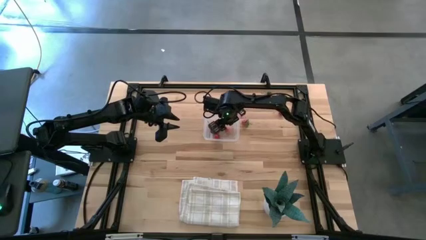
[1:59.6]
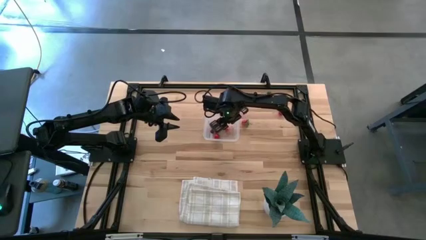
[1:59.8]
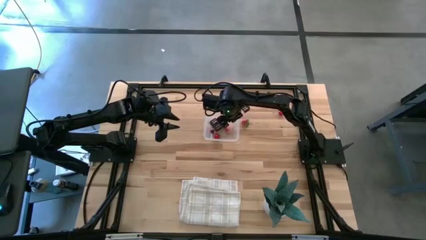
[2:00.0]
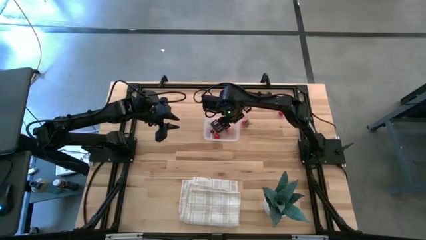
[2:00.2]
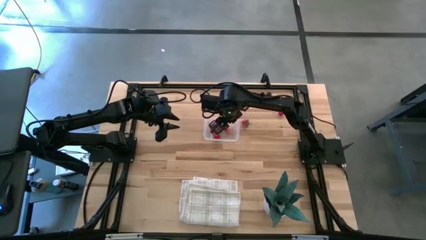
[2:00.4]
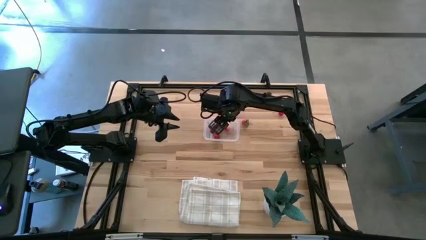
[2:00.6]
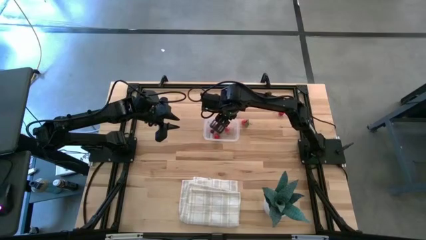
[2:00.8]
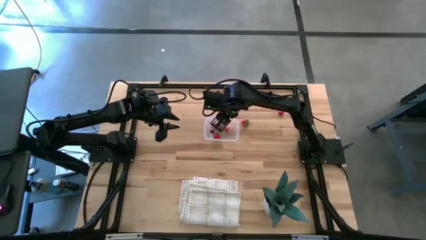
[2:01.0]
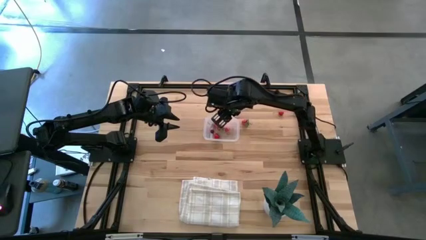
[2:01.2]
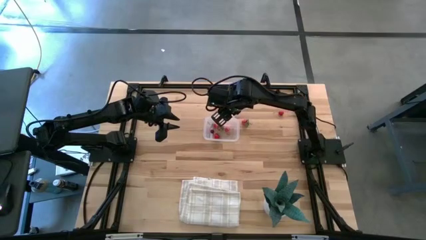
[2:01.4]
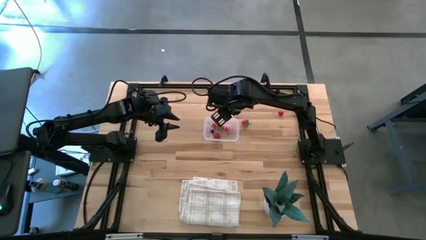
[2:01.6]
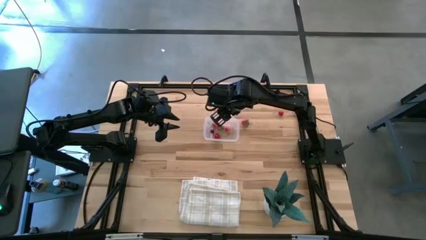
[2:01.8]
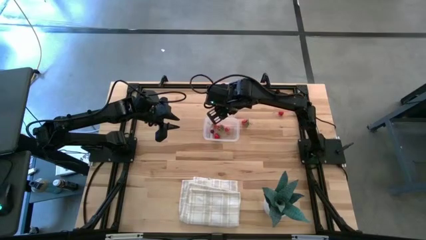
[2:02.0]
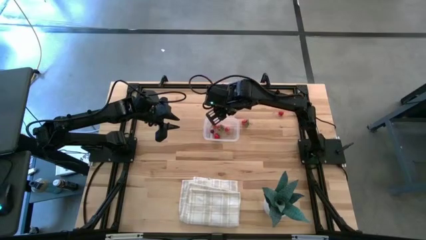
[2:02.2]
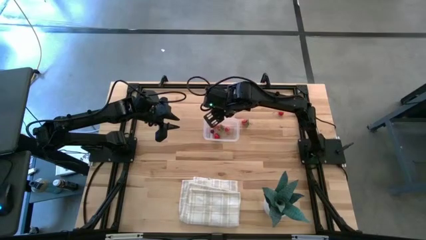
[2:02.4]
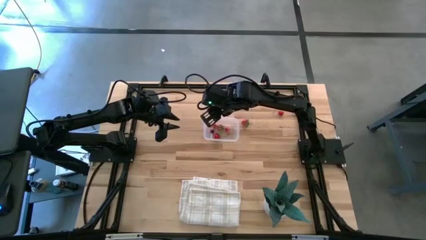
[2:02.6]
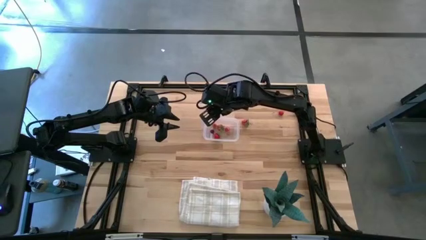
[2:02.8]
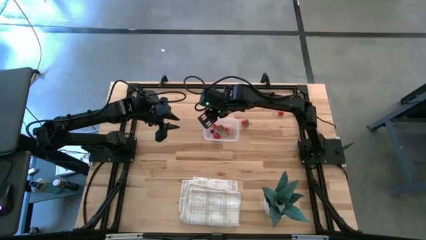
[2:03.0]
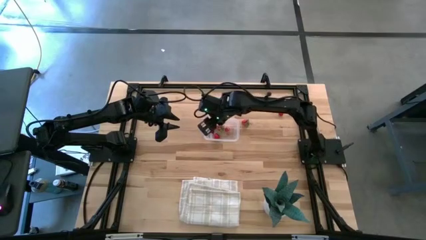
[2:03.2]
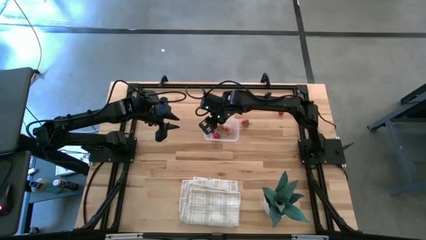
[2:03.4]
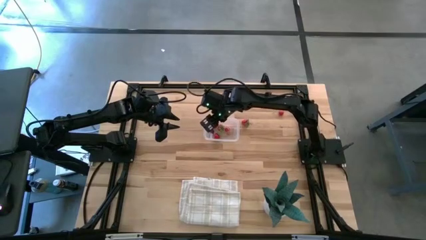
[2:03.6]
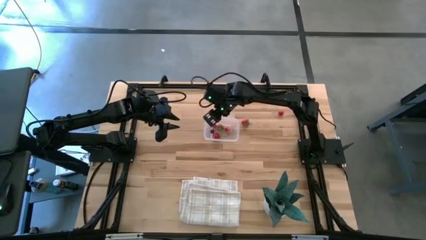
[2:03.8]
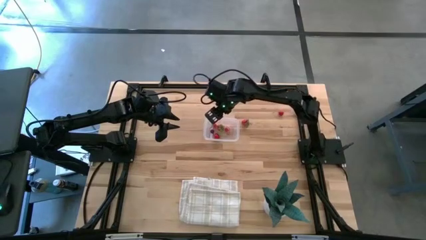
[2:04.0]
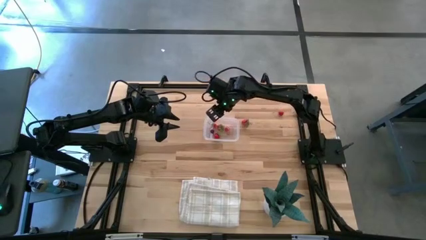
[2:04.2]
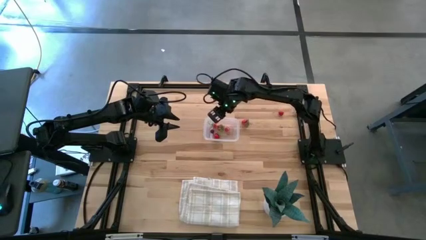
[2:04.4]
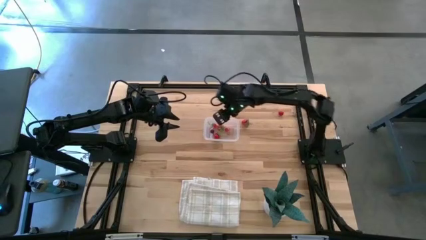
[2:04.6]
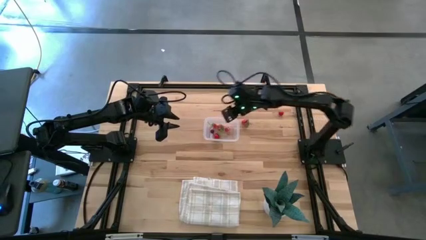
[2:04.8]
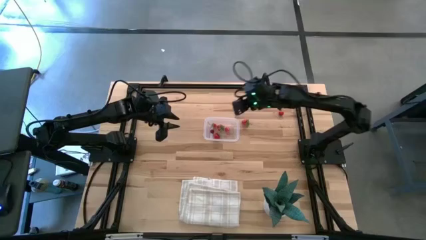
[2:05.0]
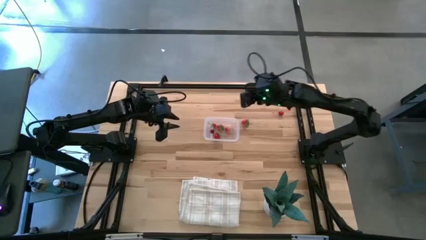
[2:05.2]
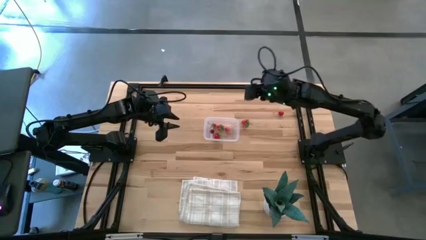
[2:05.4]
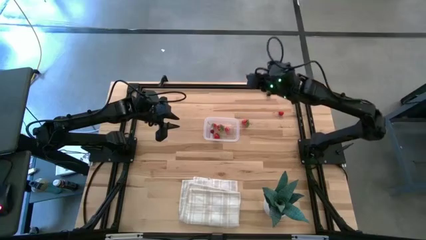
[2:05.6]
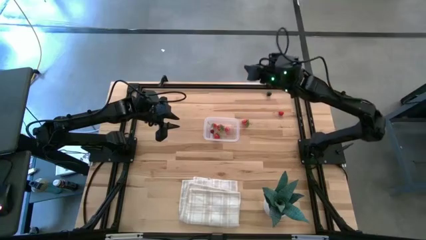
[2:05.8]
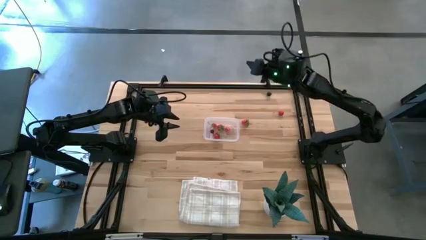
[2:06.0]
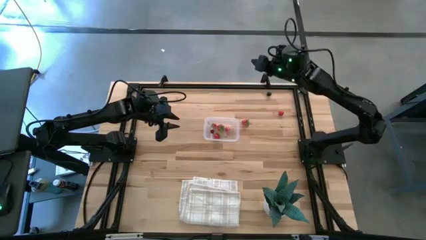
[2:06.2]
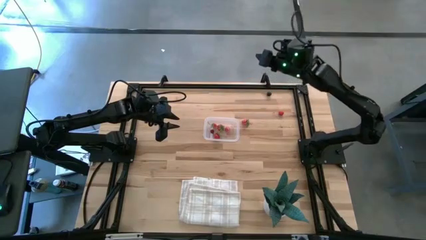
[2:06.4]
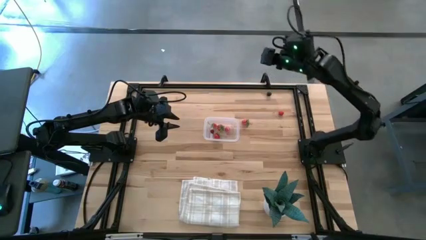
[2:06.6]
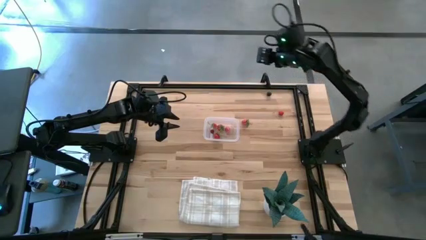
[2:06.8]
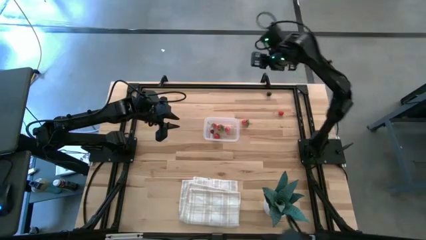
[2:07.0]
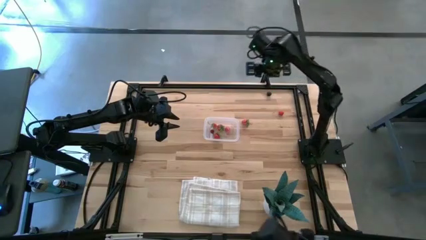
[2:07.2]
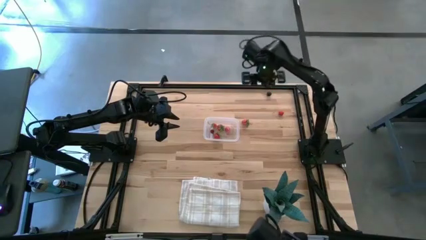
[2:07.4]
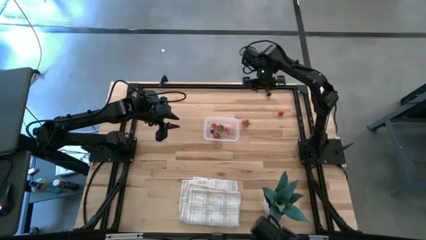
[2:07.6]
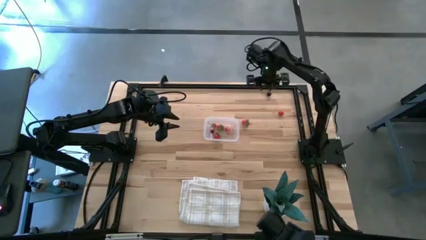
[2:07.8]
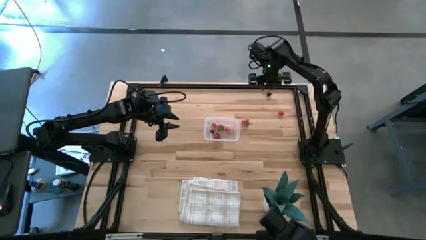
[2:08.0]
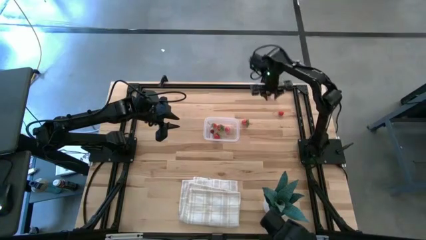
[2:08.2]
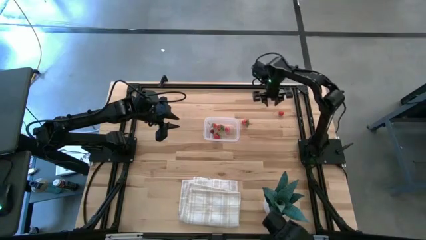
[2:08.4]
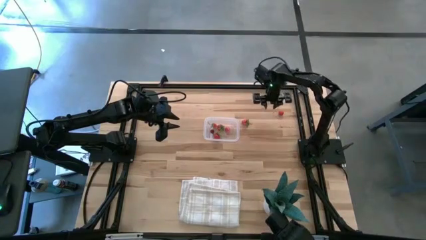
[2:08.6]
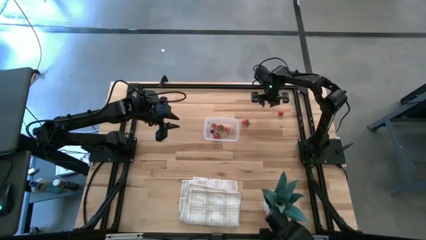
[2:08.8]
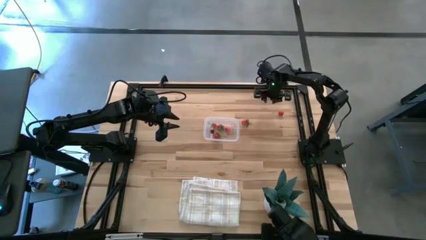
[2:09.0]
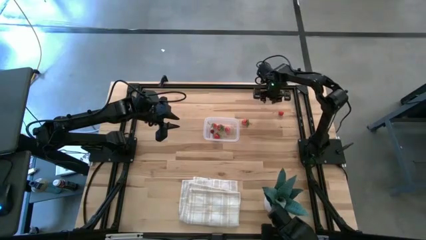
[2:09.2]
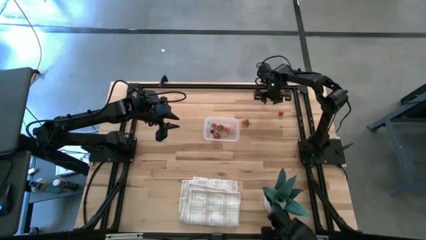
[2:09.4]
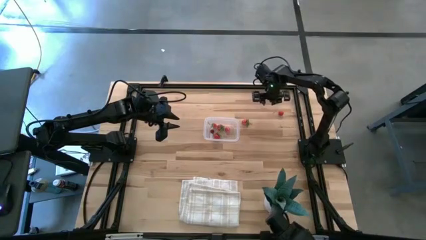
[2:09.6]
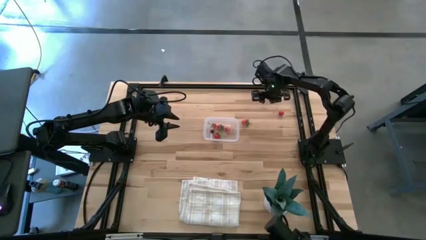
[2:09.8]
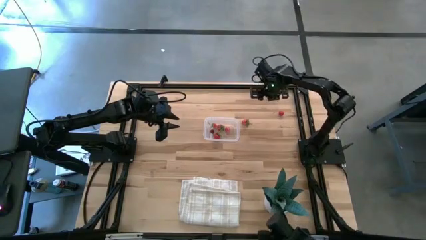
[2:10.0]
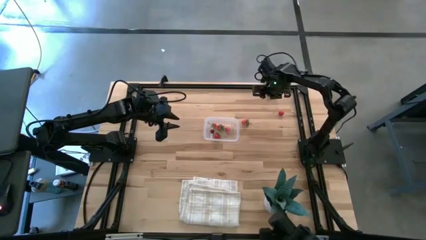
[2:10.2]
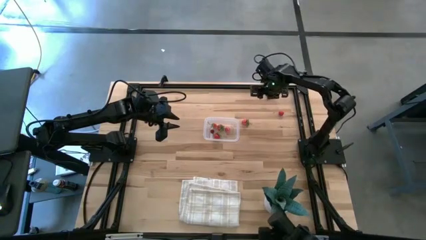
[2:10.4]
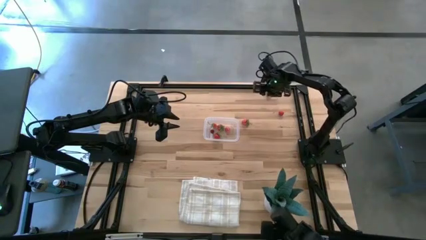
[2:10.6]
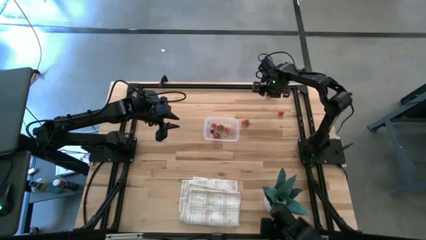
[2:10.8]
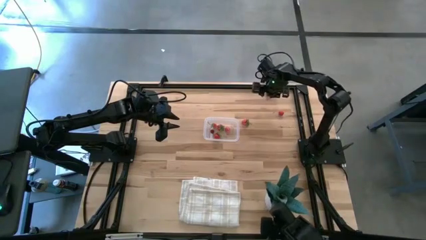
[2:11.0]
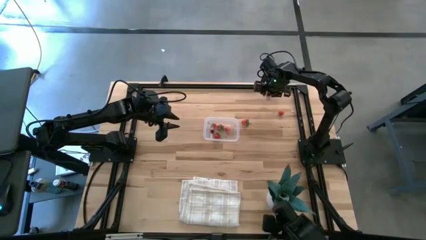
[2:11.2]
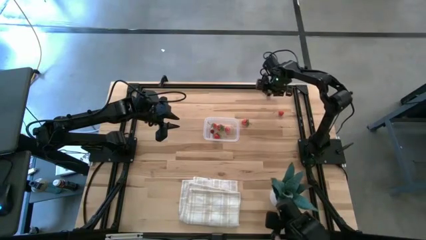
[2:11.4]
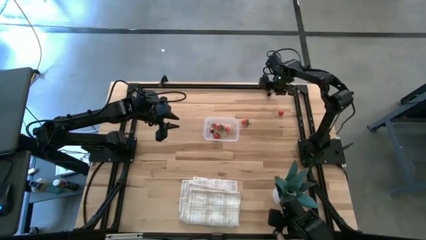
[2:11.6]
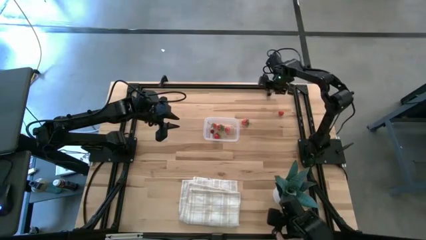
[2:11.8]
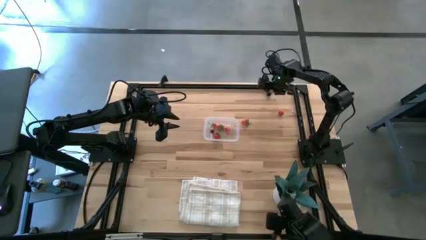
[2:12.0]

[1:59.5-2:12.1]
Task: Pick and placing Produce into tupperware
Put the black cherry into the transparent bin
